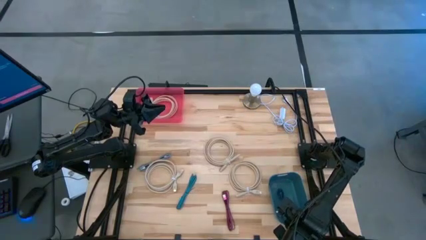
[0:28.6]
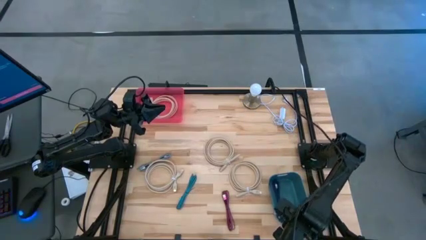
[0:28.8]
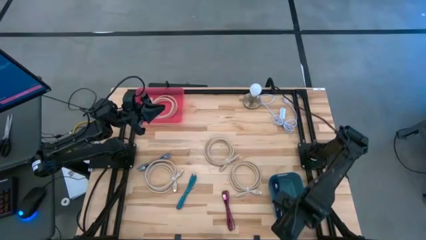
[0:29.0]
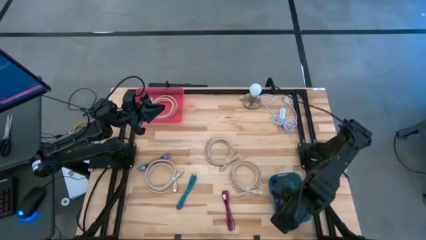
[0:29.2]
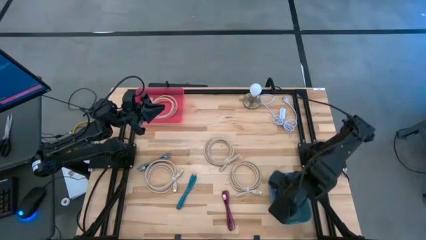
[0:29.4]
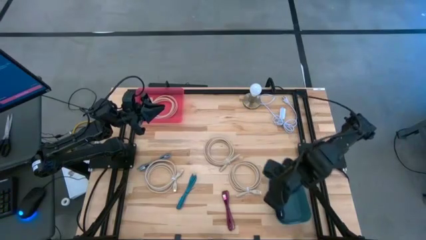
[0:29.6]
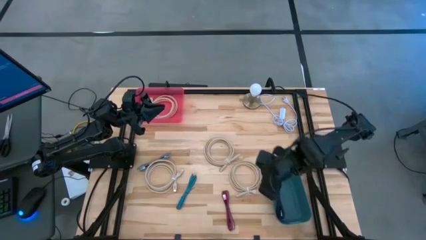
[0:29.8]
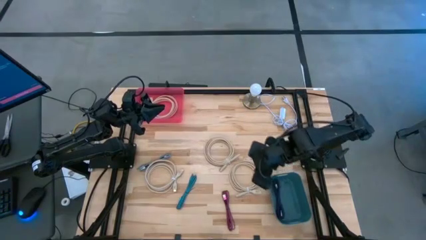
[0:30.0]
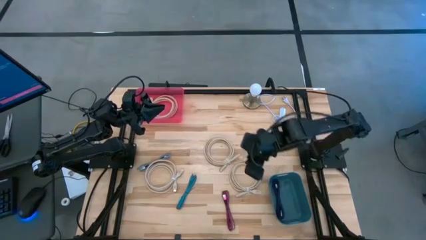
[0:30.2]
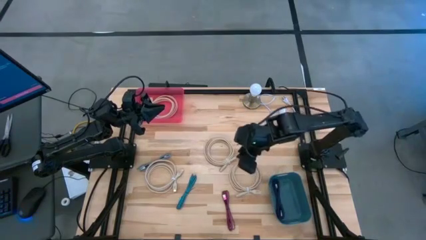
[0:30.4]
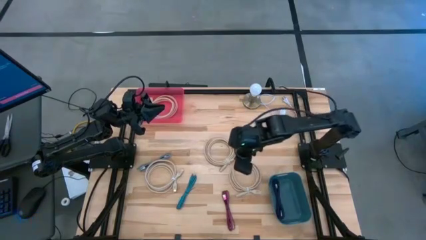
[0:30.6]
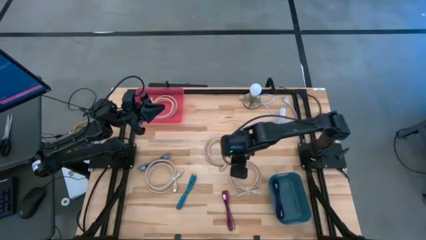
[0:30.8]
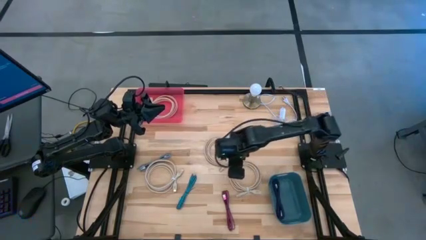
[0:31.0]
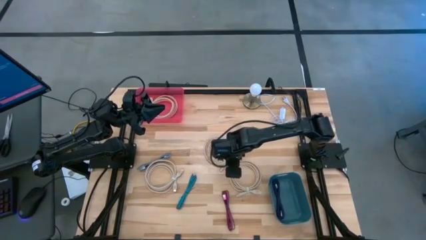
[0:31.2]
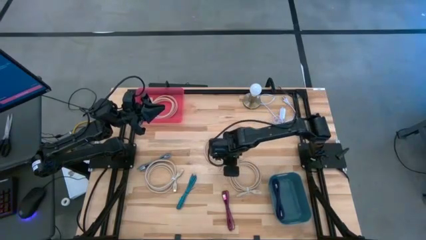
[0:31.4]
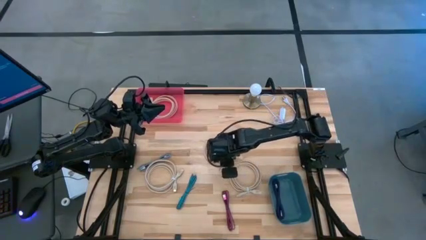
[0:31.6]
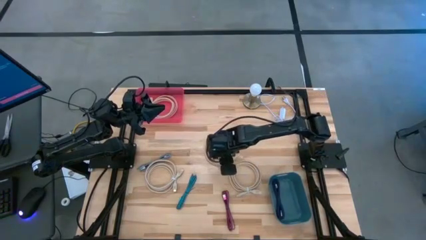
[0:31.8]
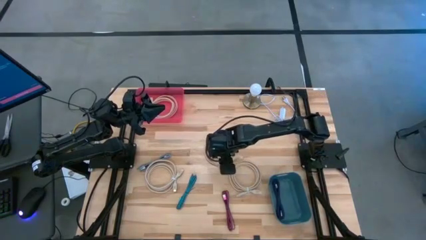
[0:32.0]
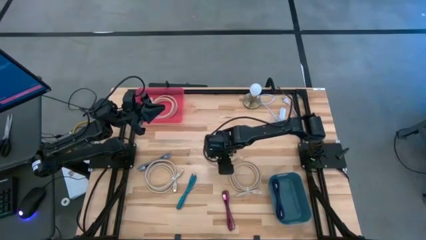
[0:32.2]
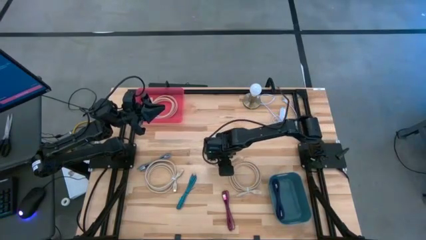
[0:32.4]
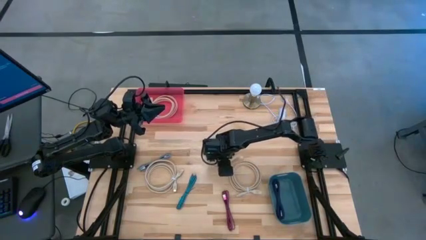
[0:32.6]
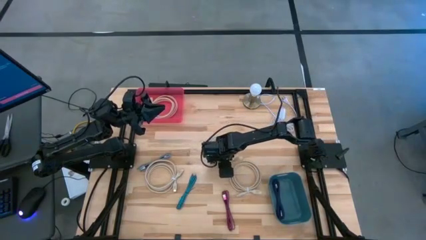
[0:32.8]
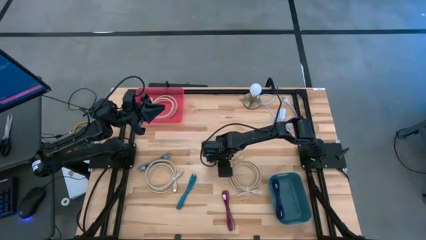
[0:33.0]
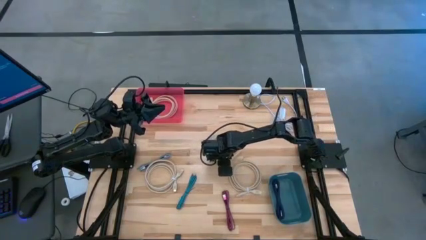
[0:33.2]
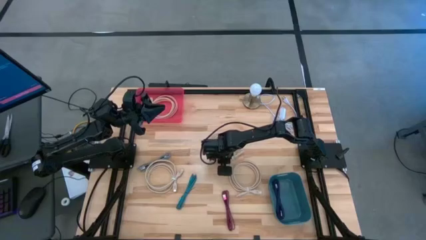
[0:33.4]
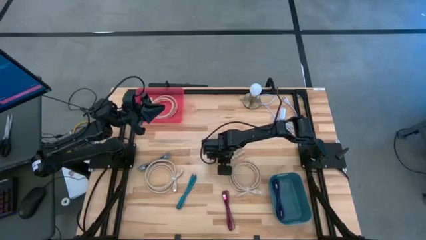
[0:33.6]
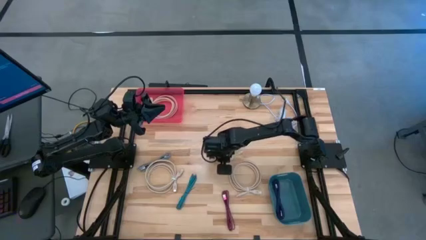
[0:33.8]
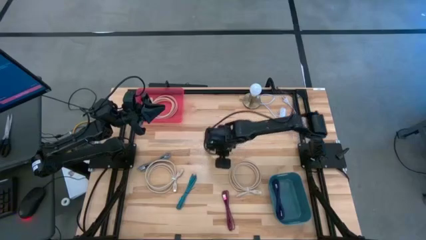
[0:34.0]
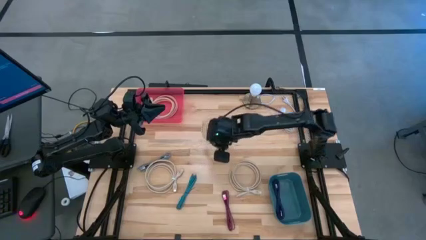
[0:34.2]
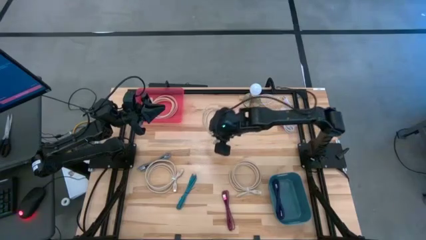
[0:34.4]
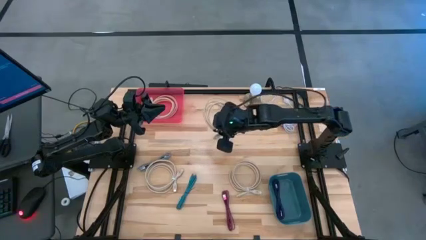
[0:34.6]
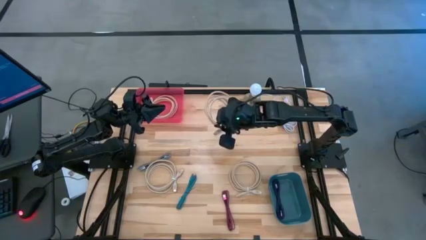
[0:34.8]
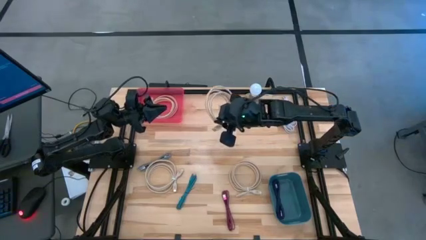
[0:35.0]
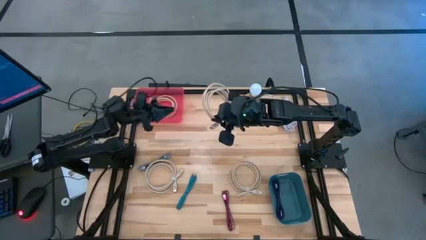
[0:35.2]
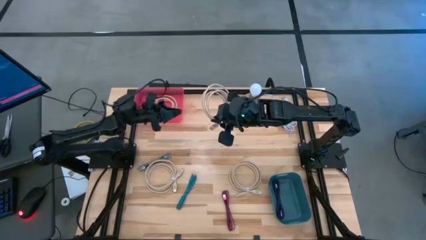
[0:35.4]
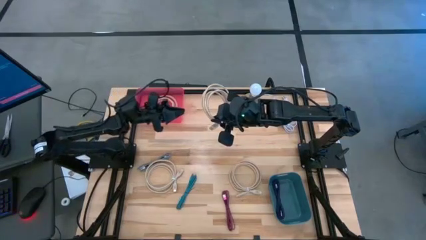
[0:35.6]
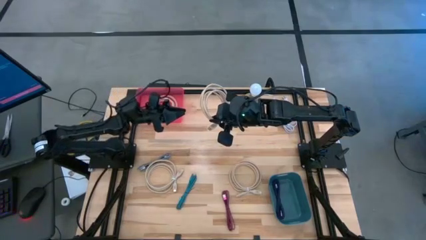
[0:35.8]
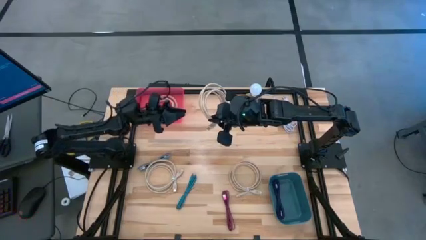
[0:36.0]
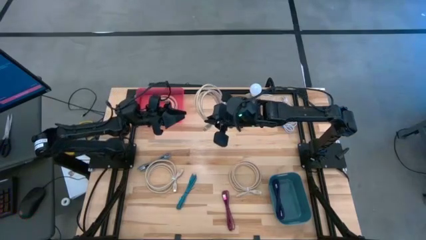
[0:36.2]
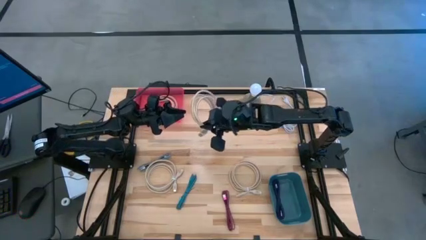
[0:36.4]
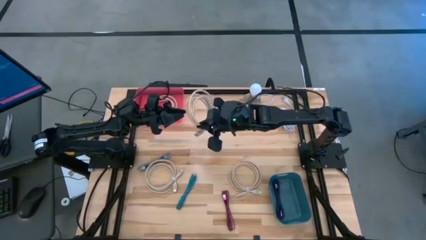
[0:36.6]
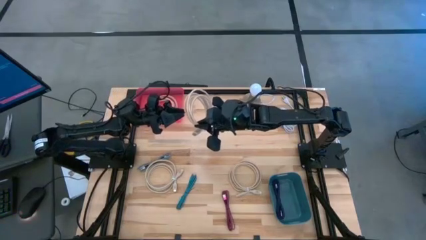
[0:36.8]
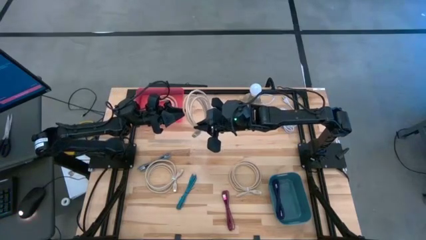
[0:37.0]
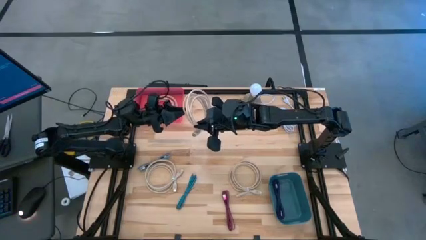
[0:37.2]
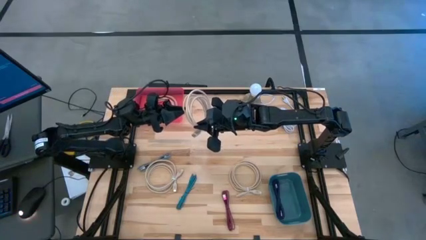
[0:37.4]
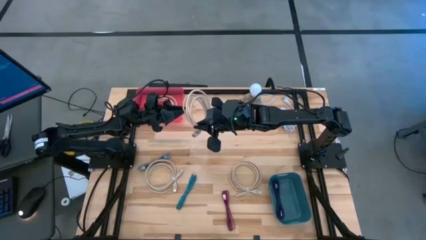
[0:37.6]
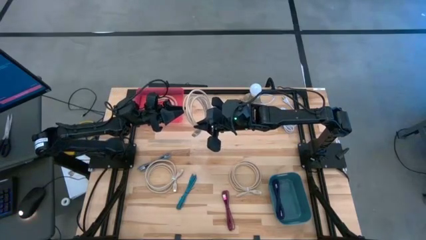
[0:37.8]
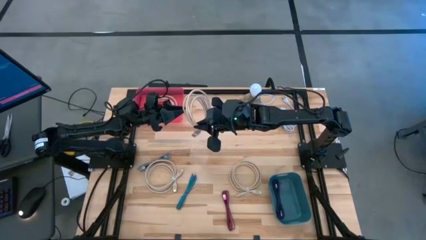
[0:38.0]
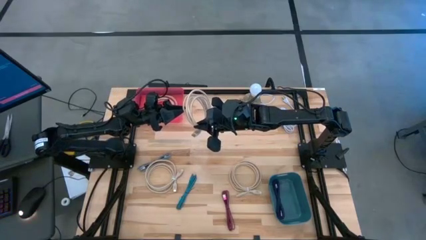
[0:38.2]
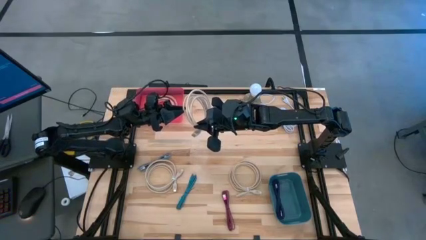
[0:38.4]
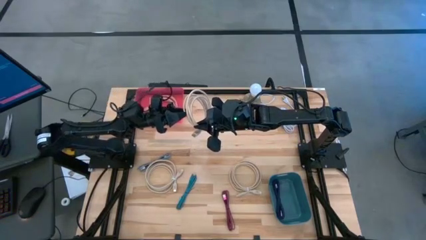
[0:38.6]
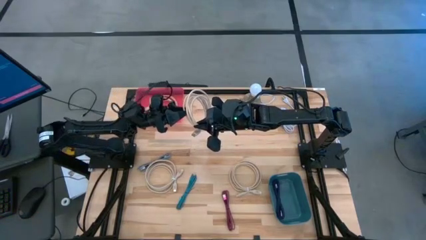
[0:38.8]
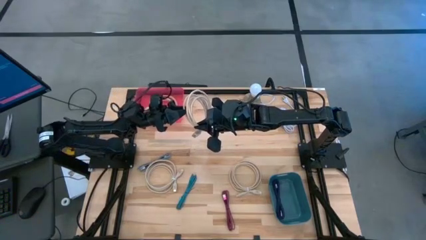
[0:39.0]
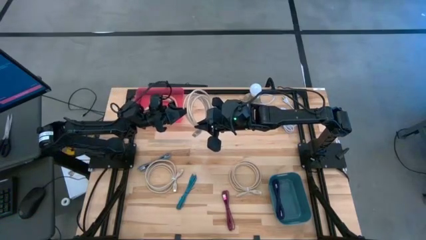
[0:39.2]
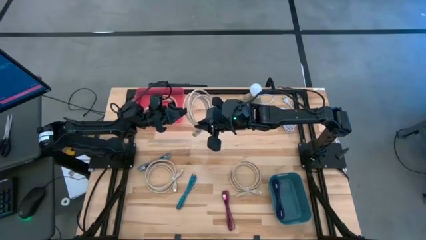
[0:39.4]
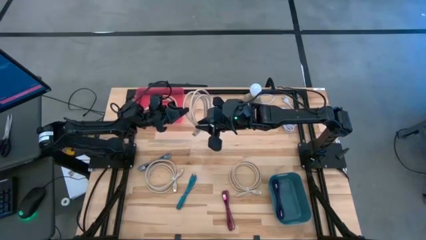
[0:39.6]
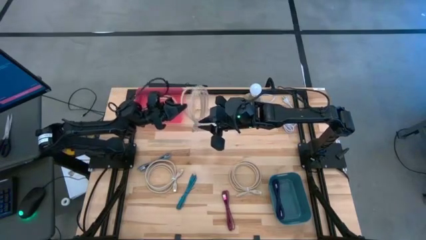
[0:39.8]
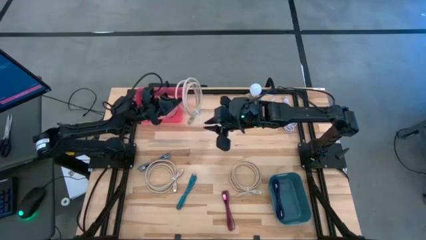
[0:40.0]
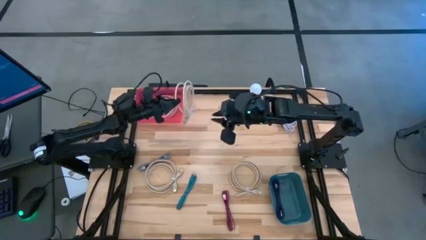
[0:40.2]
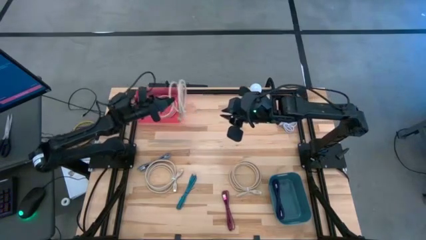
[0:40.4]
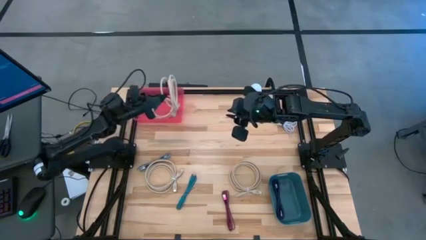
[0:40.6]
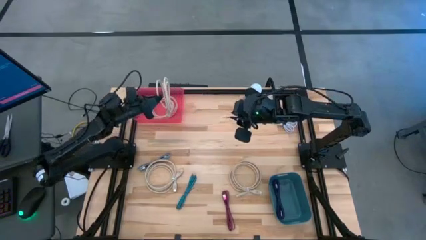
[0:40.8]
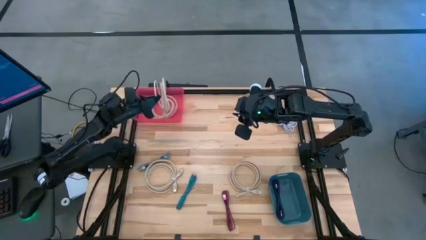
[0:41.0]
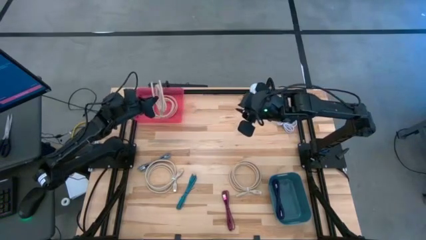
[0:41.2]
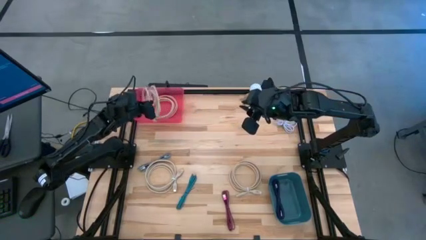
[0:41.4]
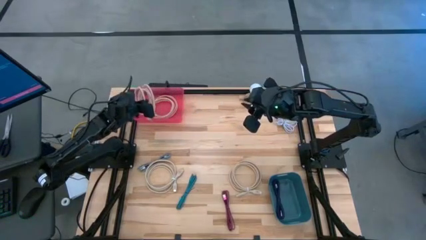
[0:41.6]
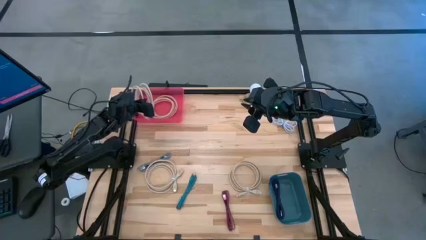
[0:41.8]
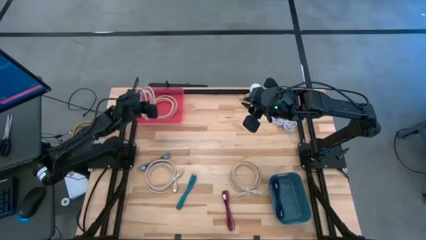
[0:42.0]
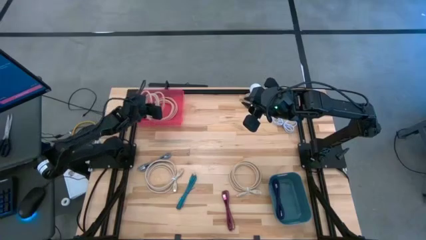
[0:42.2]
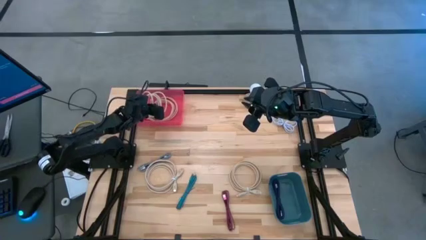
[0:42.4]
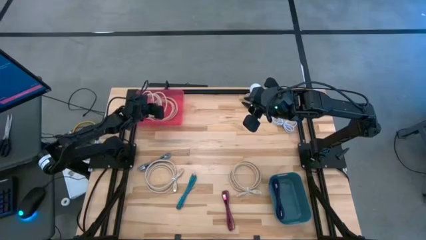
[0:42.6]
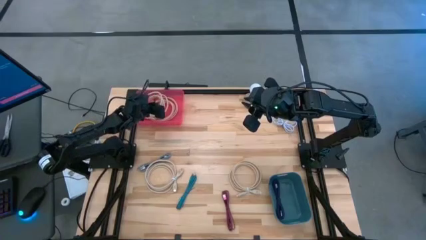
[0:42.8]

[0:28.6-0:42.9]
Task: Pick & Place USB Port
Put the brown USB cable into the red bin

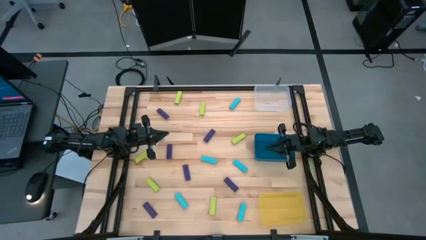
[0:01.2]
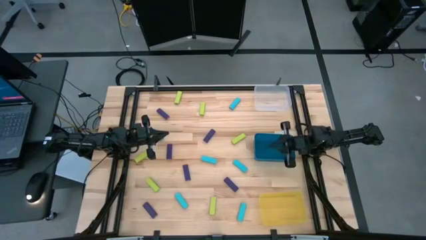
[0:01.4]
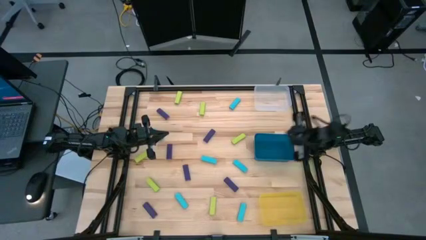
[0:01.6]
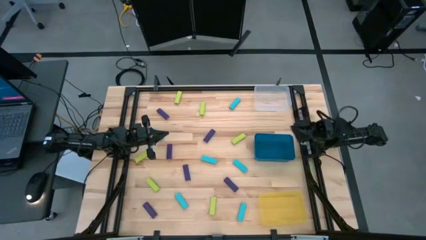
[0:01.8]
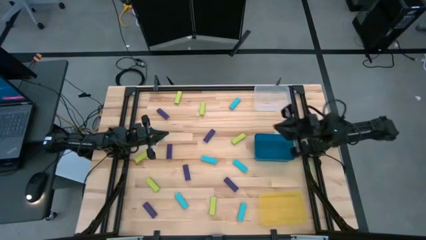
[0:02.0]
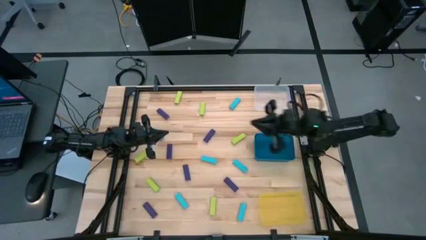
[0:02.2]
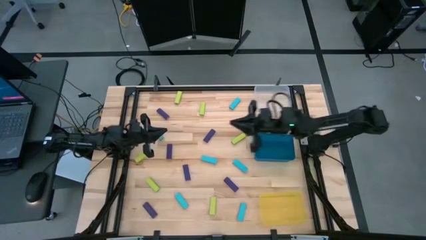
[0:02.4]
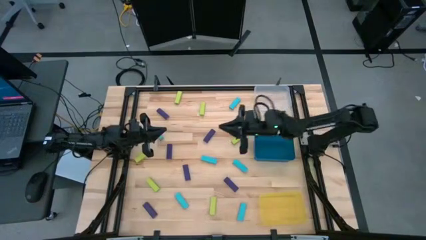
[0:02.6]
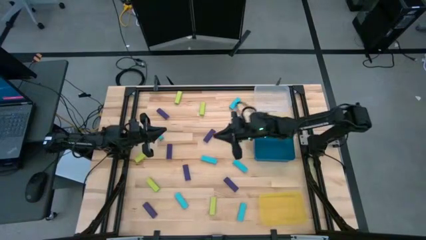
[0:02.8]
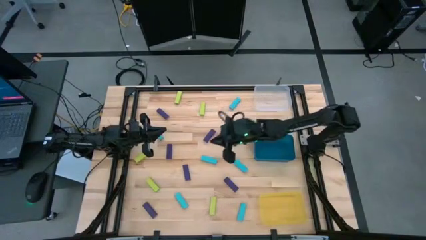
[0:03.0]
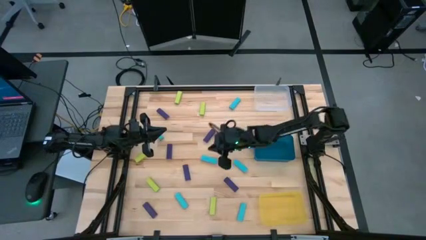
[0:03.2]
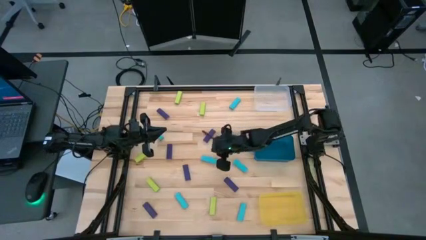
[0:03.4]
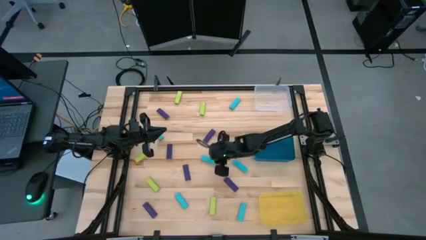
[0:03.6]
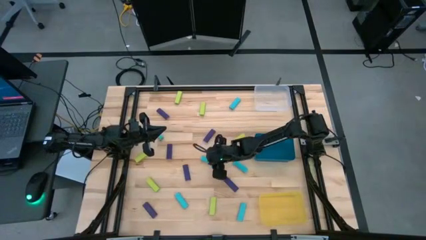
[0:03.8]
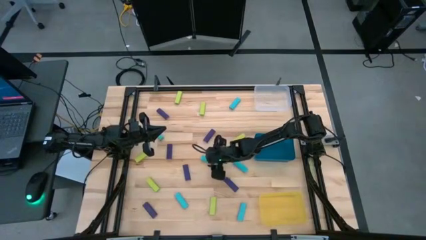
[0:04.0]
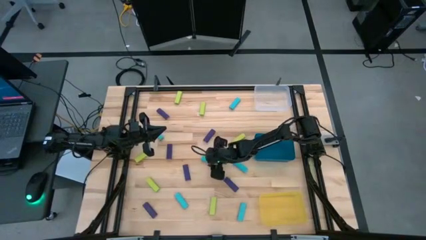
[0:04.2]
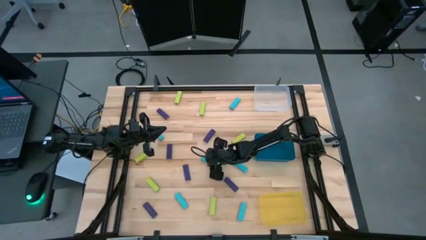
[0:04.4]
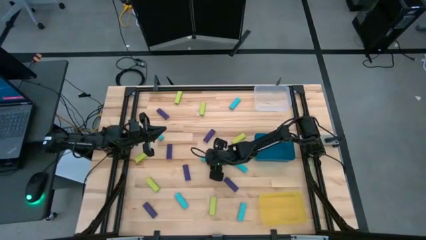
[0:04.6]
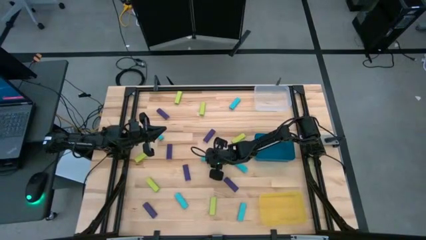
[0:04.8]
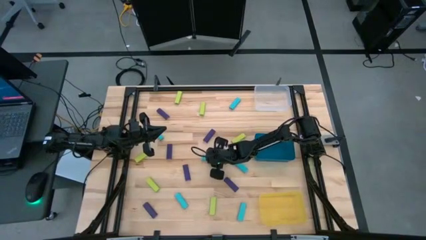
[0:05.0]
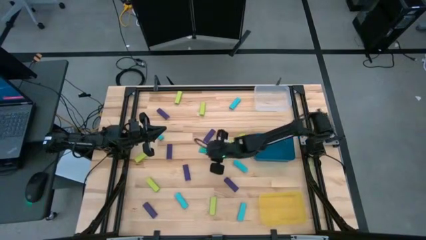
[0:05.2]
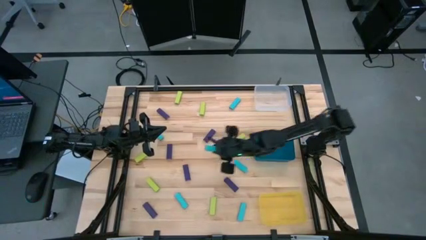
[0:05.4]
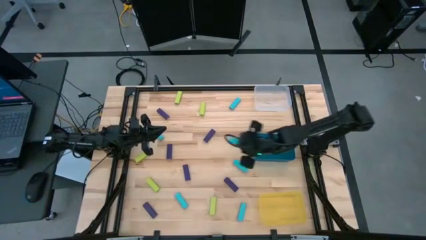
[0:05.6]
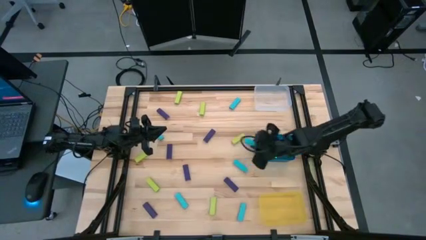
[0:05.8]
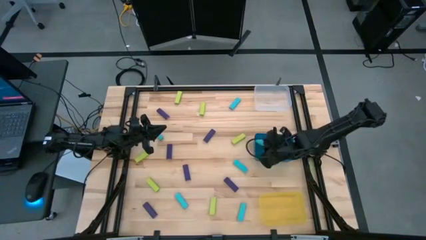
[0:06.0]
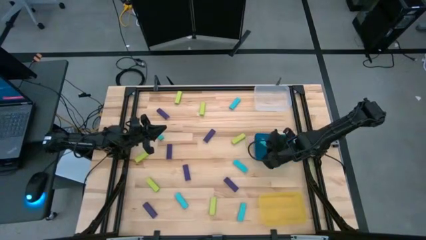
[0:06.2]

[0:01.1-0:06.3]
Task: Sort blocks
Put the light blue block into the blue bin
